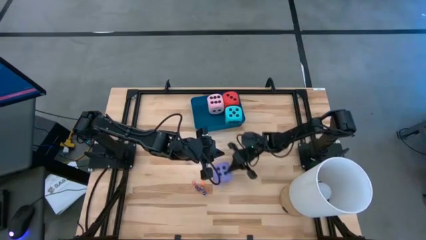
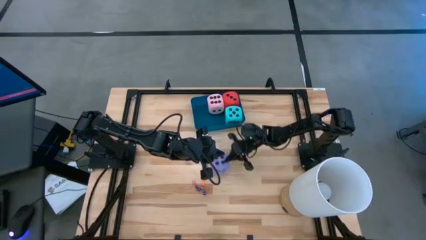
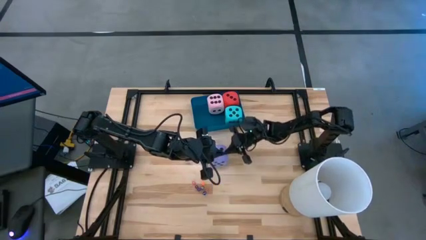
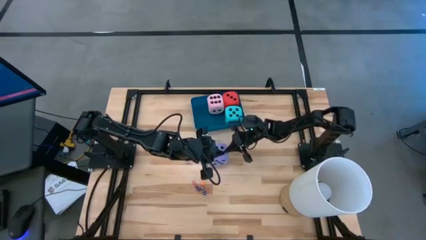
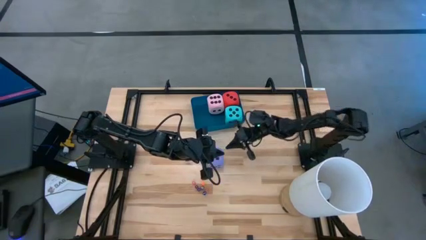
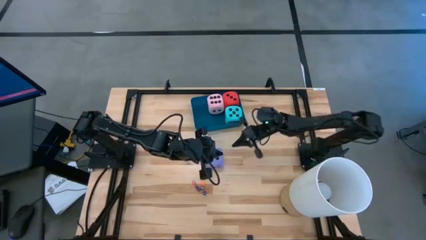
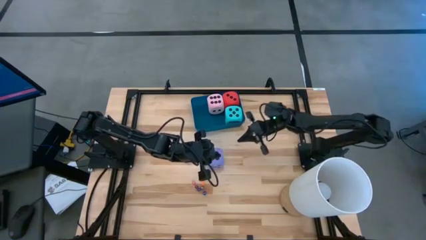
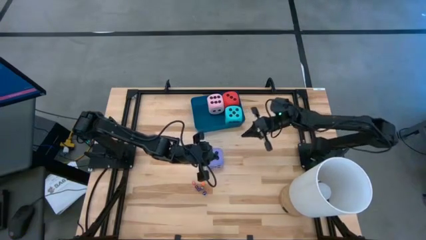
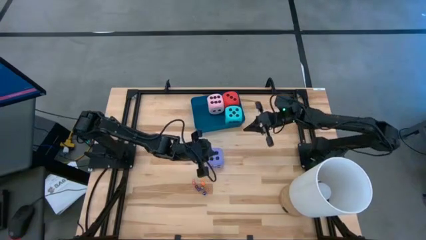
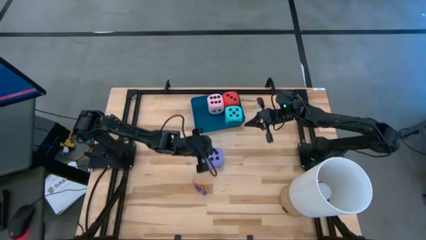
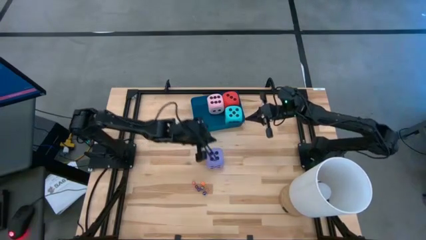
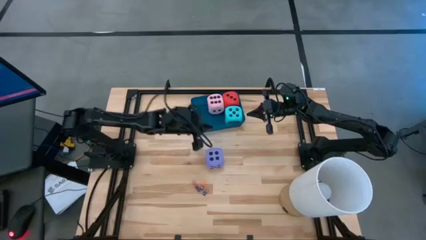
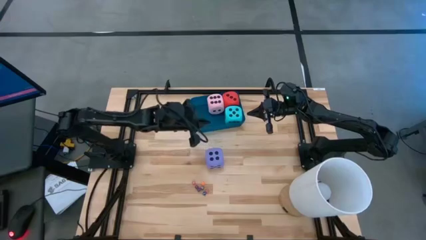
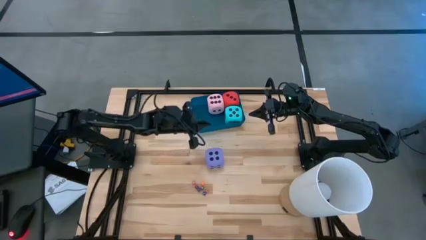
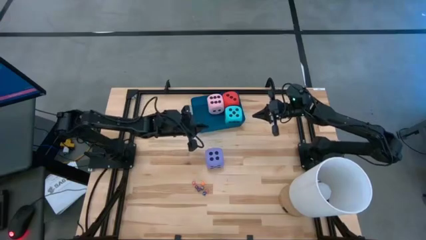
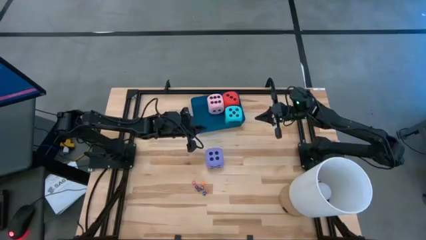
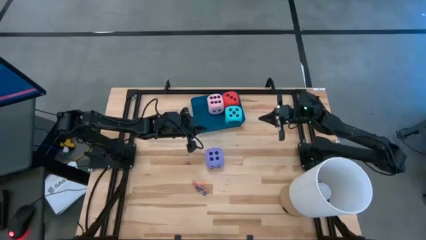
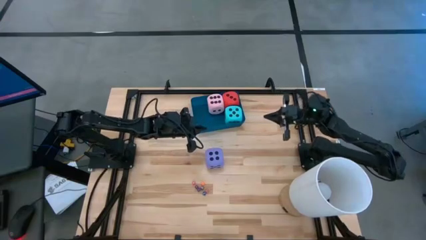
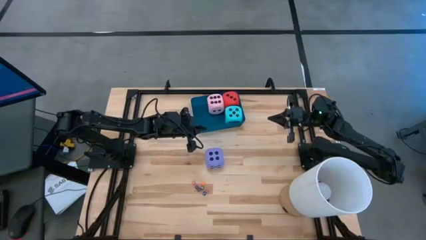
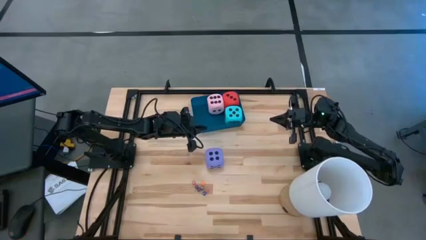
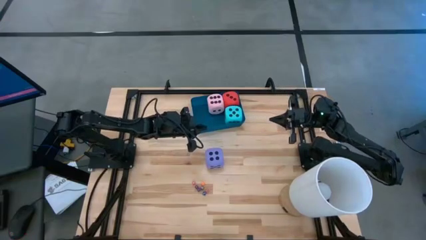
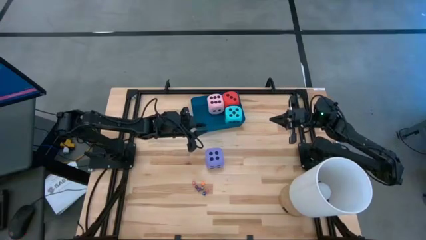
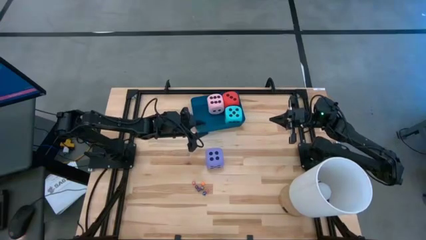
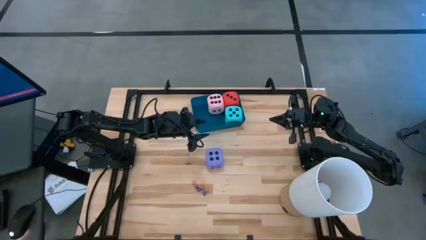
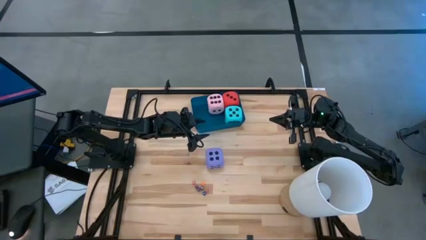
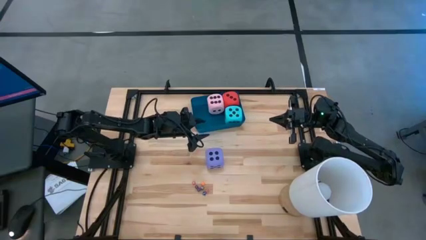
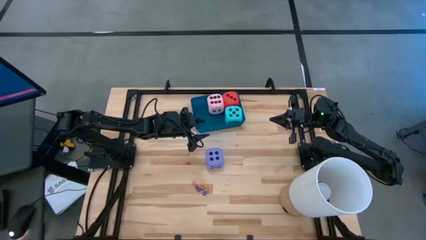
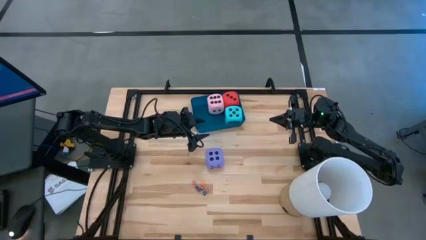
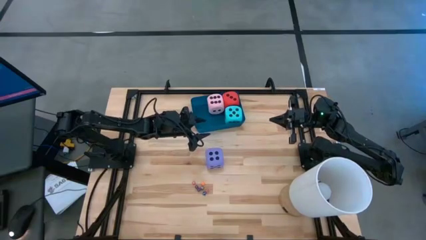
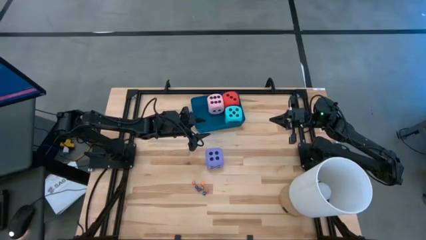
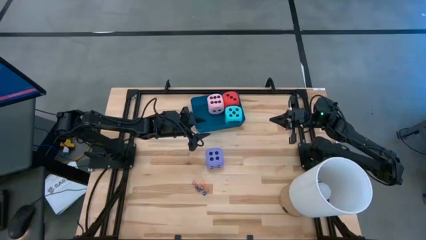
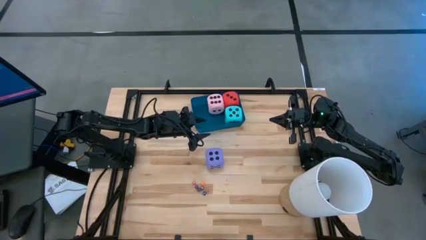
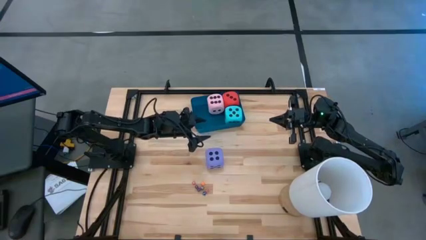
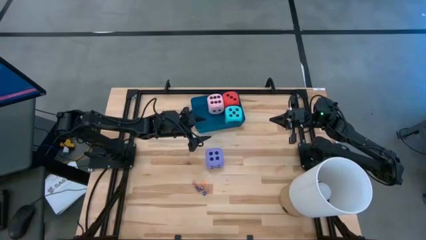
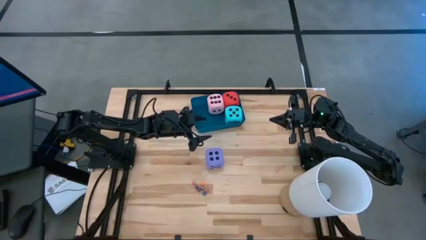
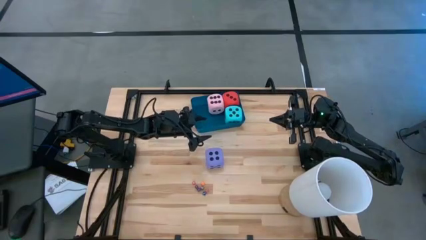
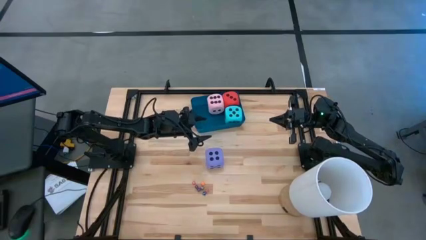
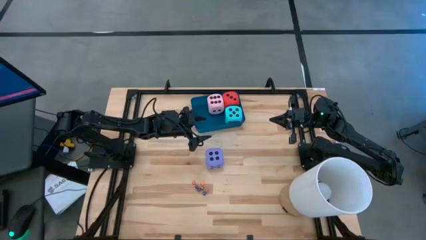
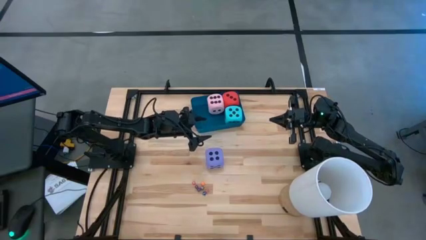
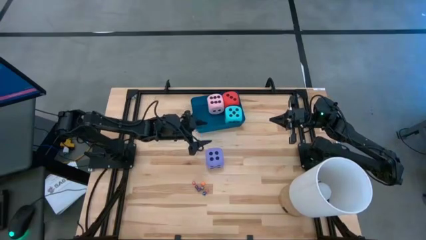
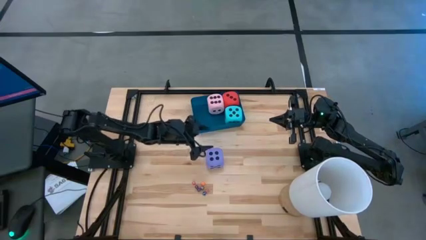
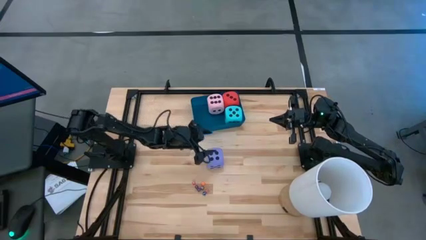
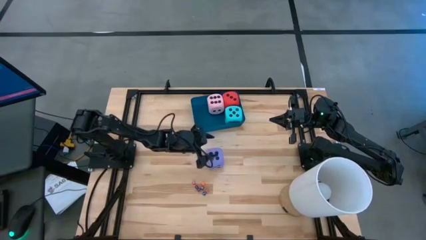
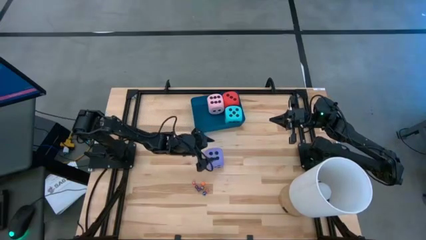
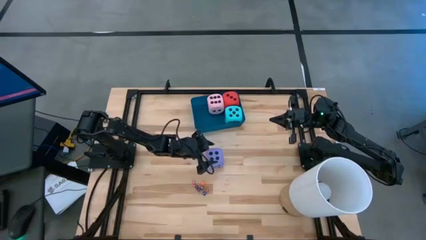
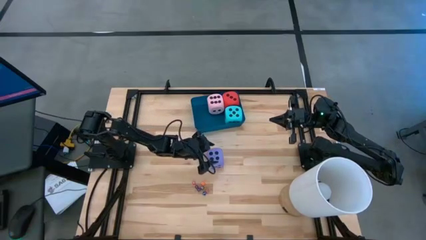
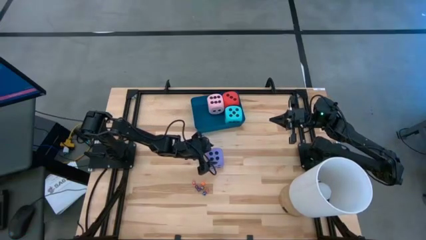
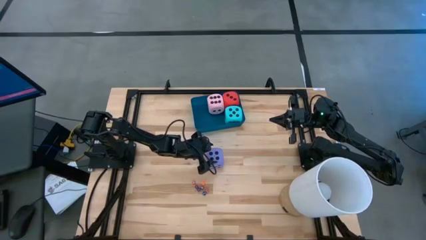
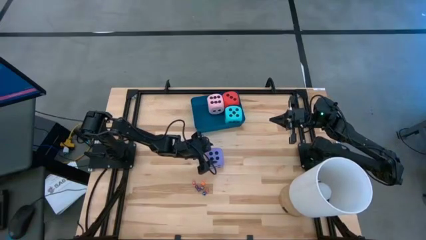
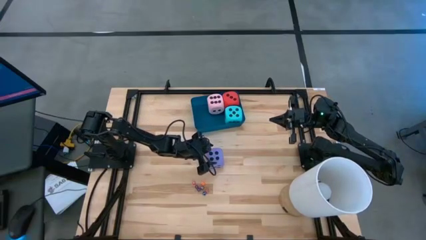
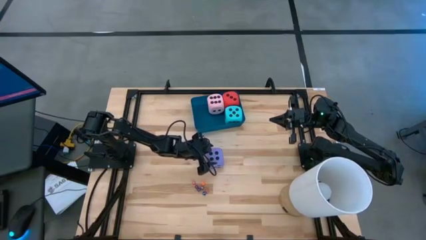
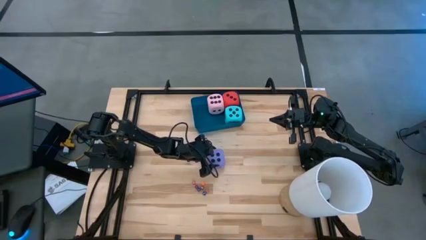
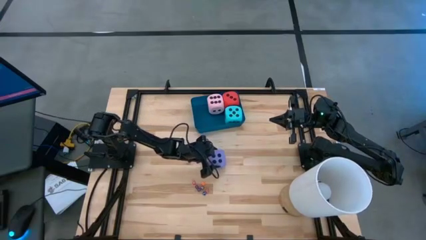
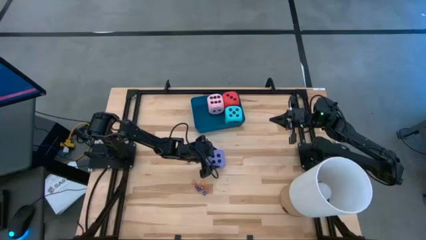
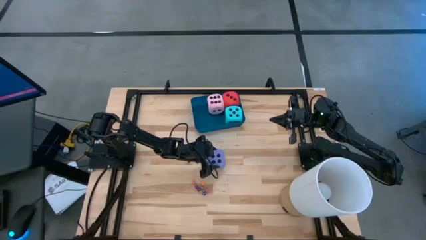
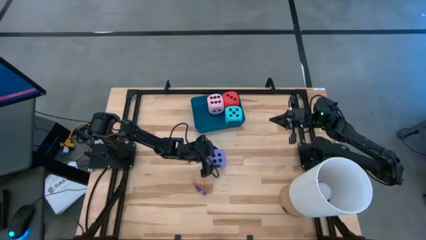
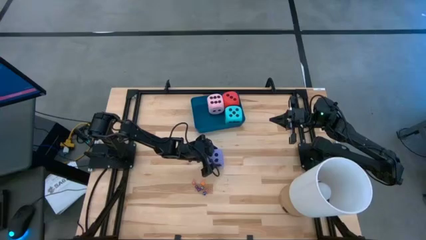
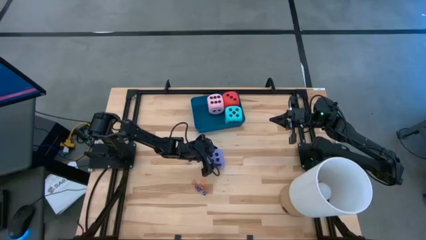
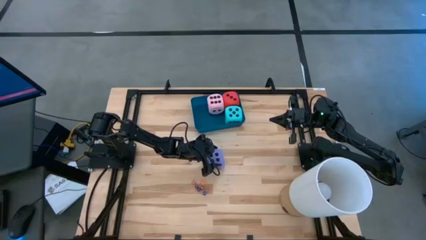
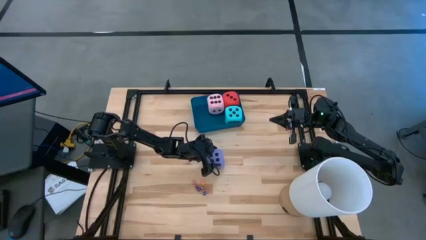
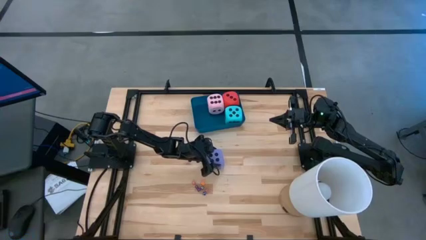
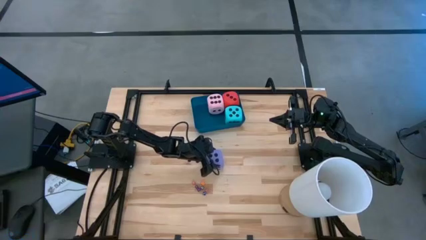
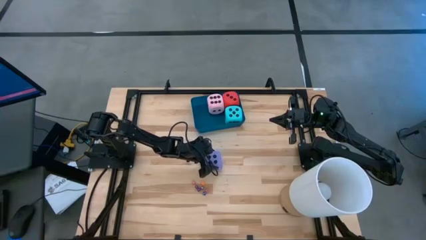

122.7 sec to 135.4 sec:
Task: Pick & Place Dice
Put the large purple dice into the blue bin
